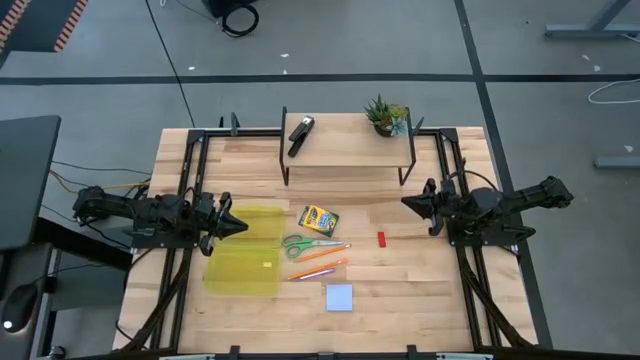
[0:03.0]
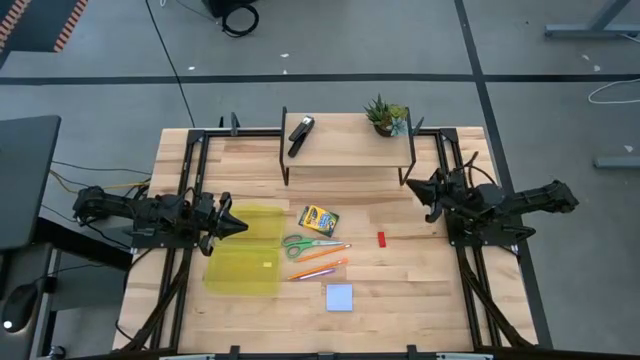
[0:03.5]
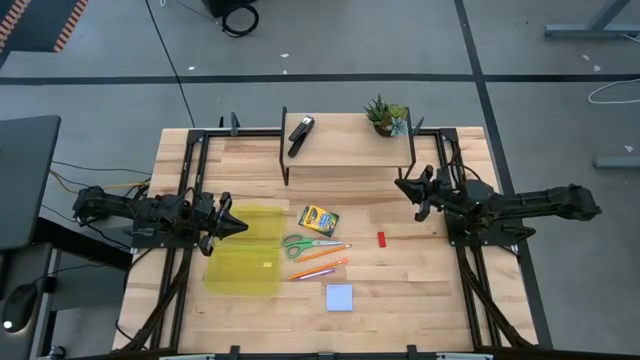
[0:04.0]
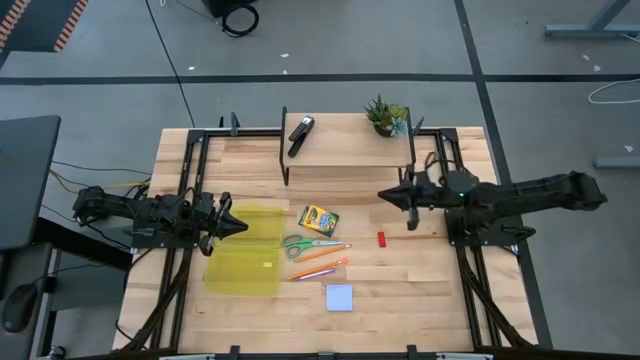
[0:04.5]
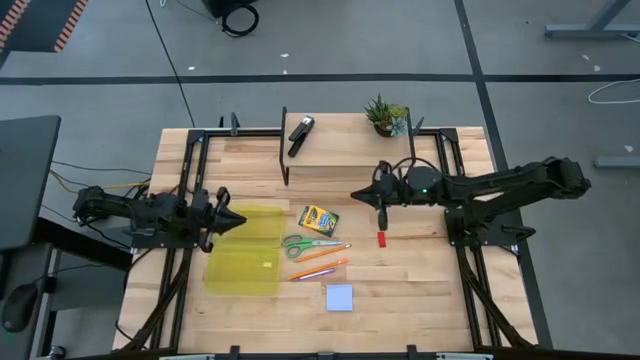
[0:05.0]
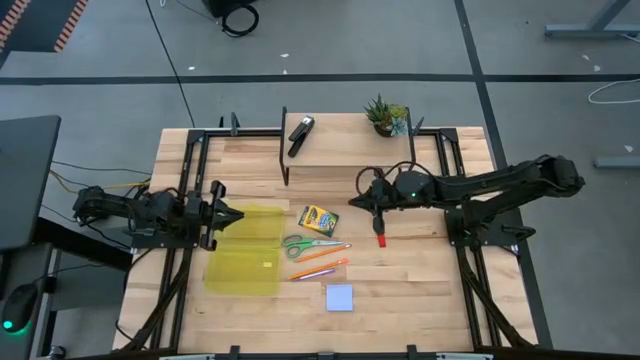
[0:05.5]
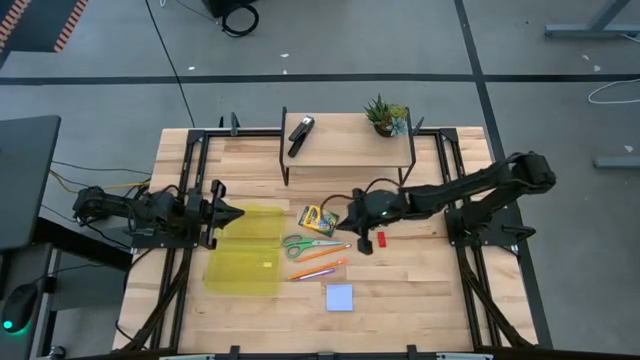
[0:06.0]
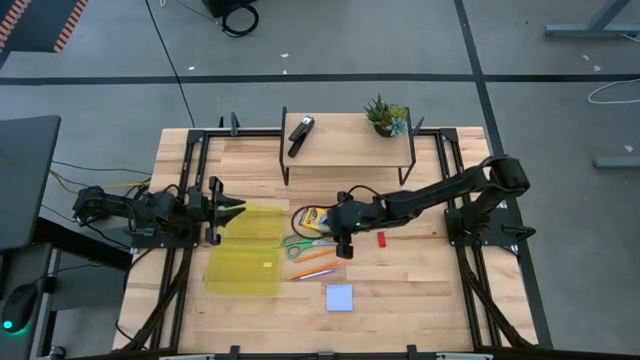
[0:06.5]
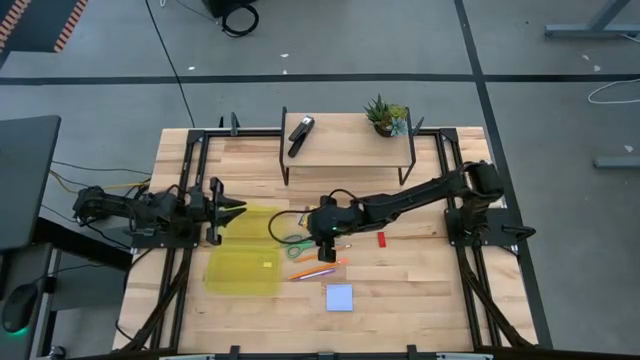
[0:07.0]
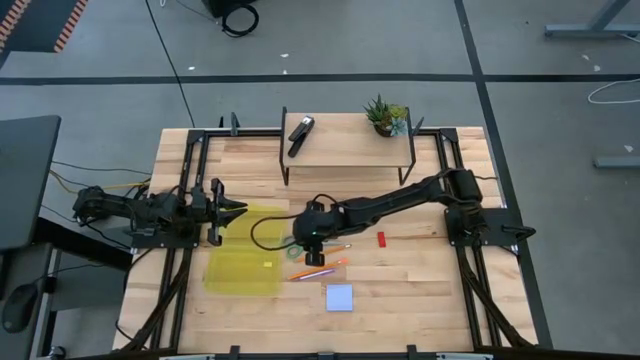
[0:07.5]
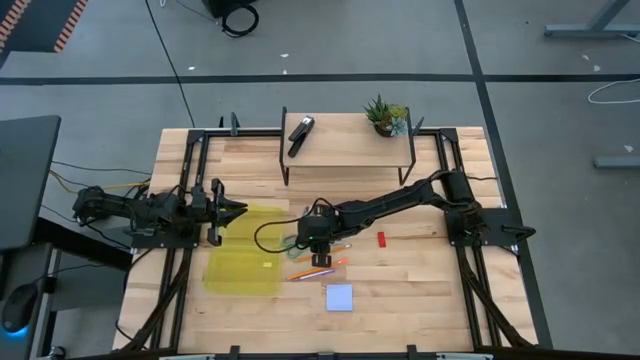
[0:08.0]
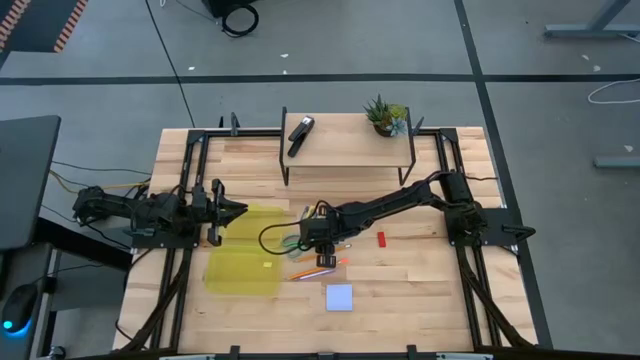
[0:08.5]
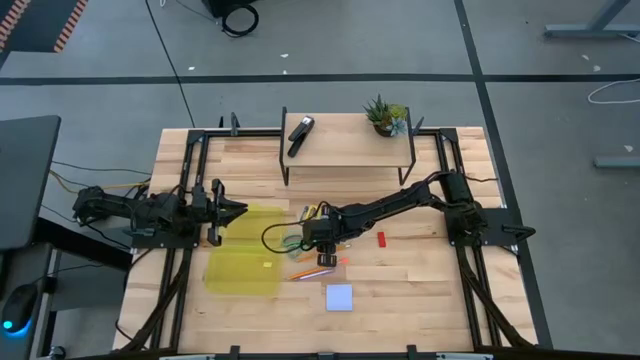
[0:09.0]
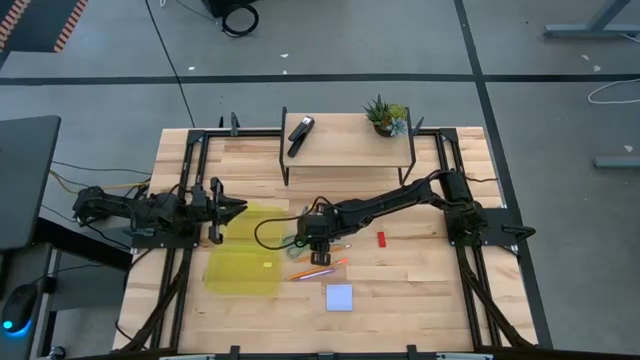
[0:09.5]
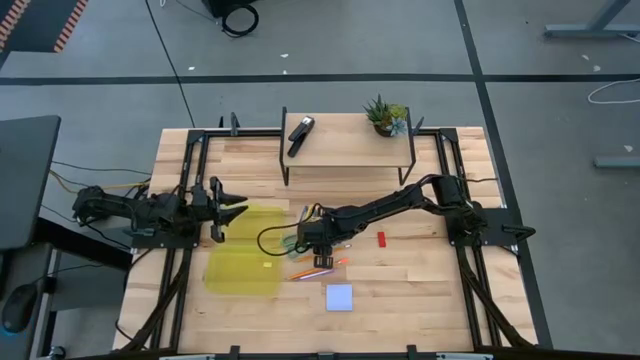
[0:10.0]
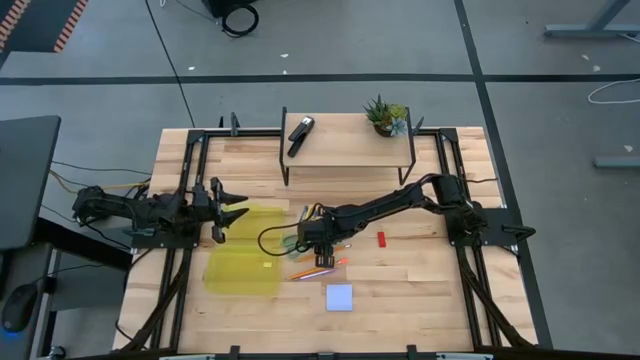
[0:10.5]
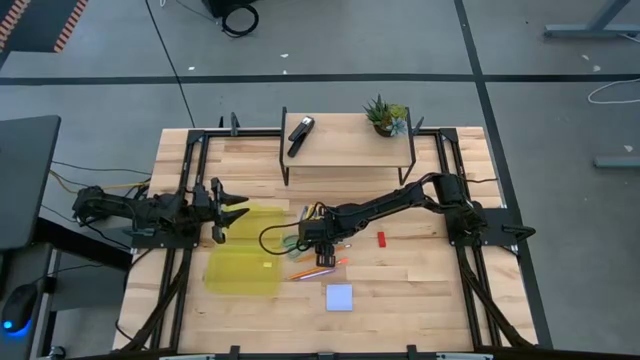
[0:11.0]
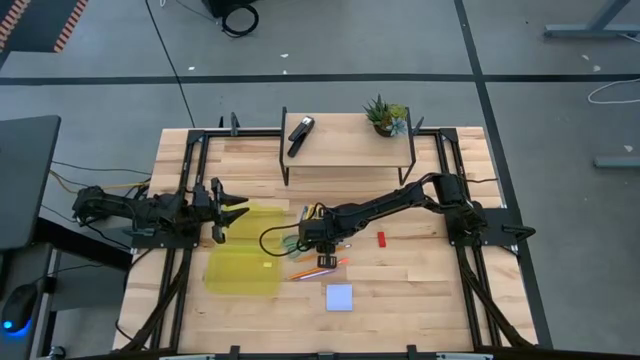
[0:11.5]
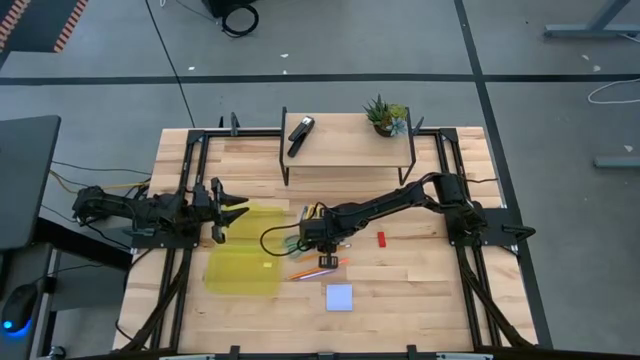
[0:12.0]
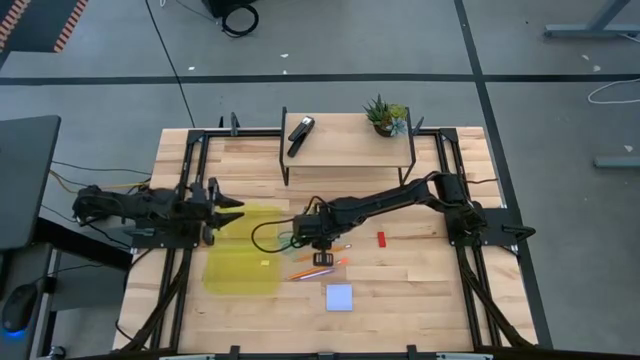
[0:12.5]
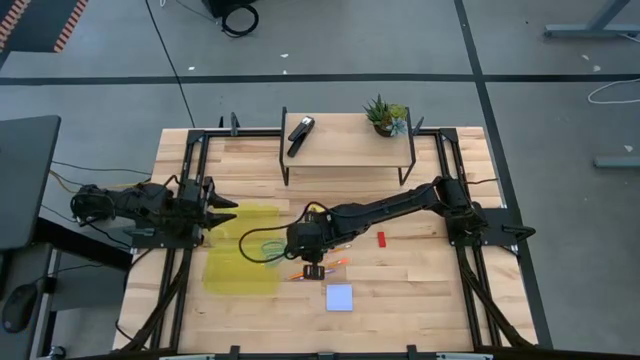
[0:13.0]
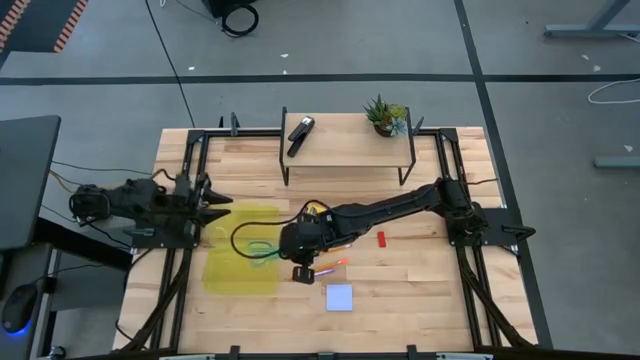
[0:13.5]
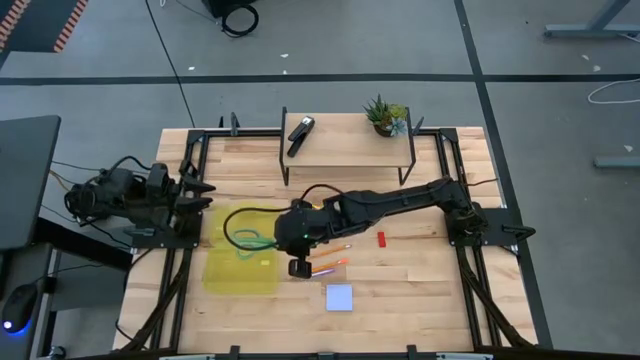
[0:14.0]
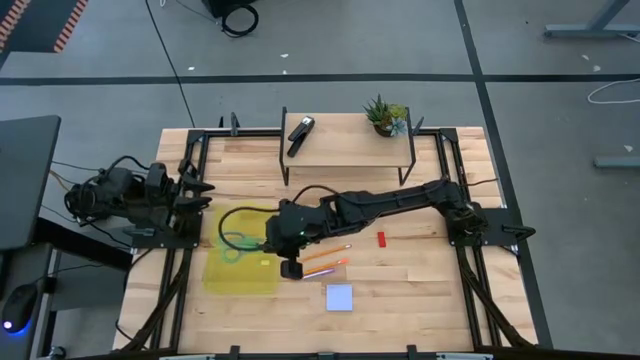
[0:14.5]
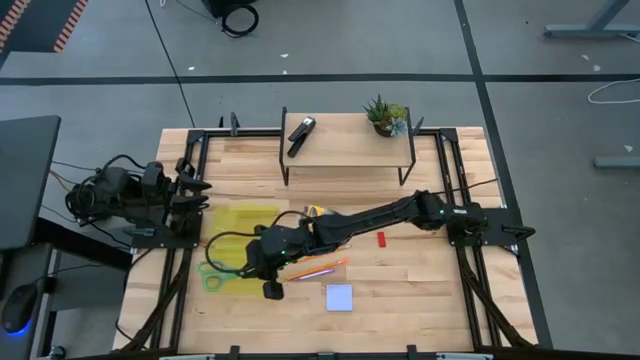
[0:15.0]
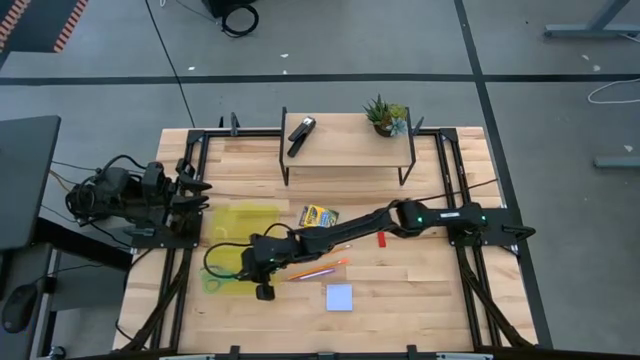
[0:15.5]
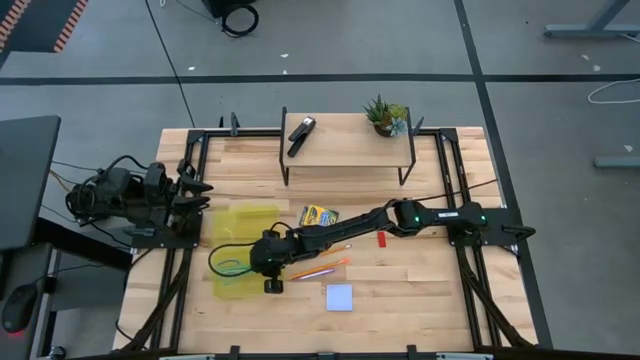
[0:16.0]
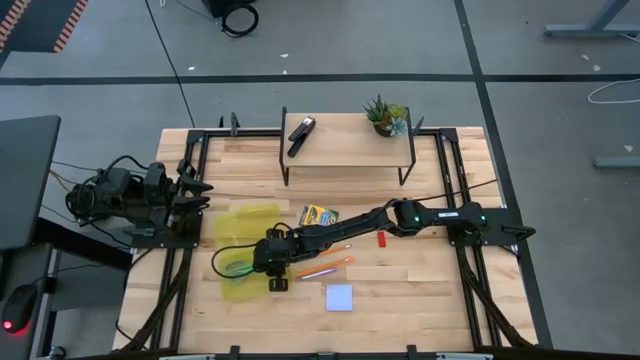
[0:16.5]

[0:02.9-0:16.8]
Task: Pack school essentials
Put the green scissors into the yellow supply box

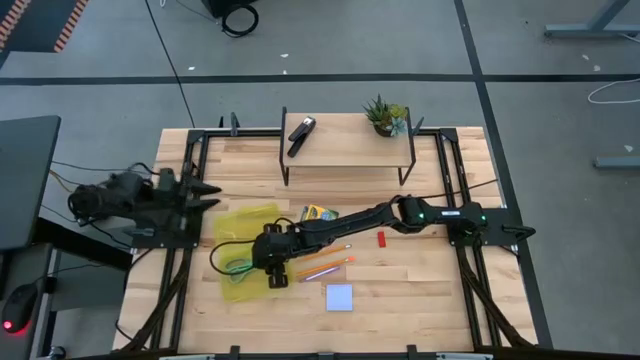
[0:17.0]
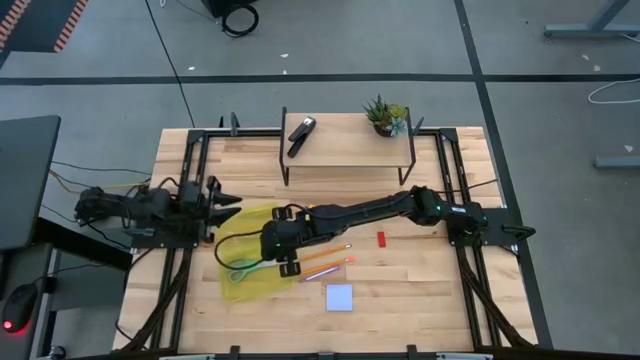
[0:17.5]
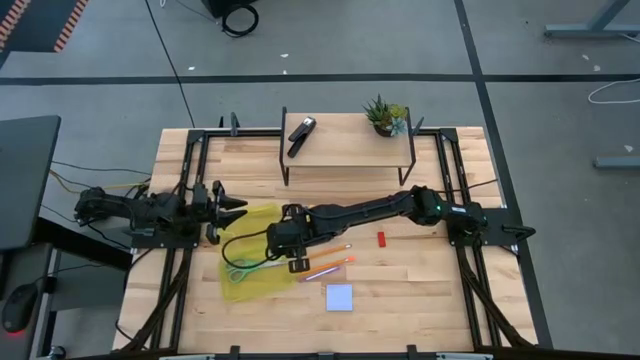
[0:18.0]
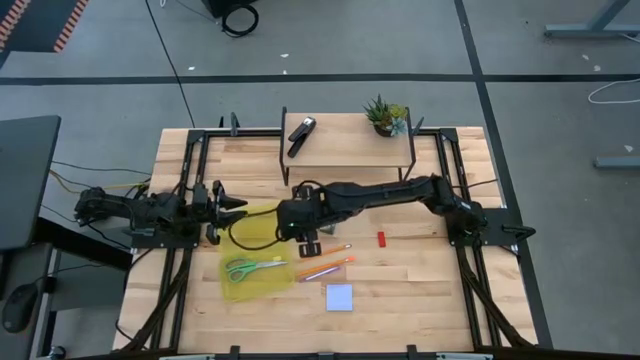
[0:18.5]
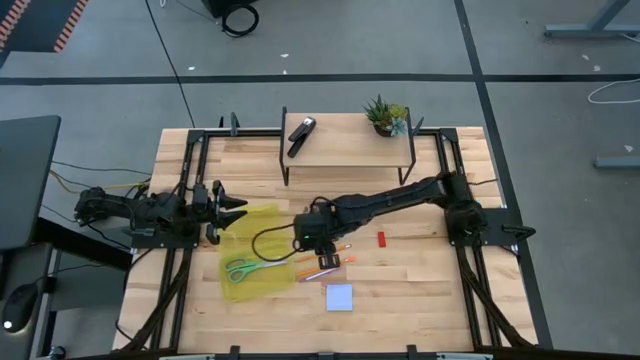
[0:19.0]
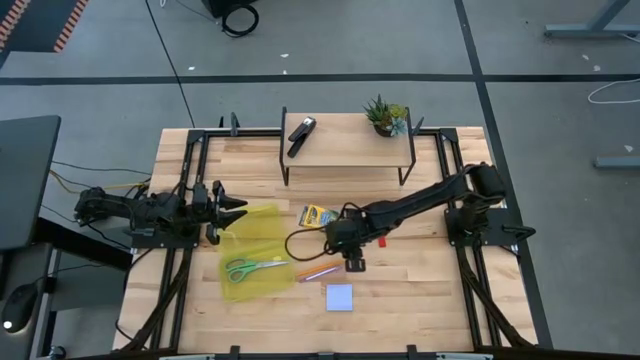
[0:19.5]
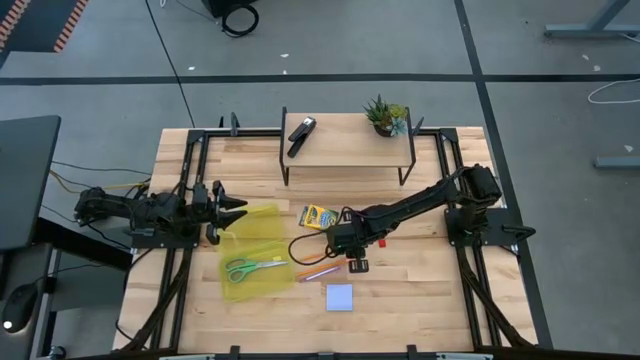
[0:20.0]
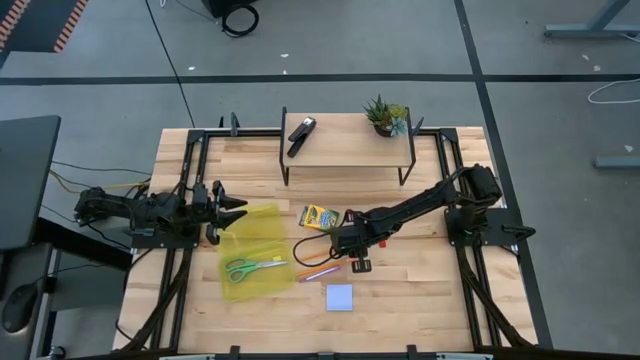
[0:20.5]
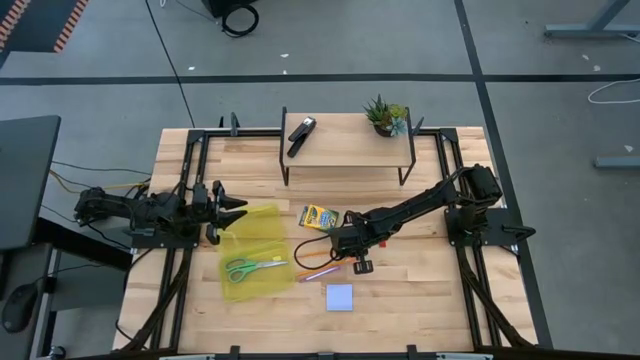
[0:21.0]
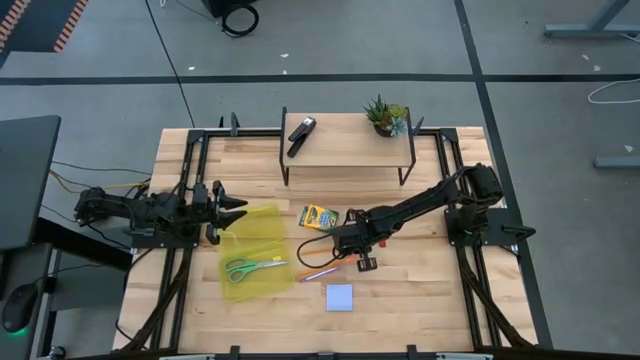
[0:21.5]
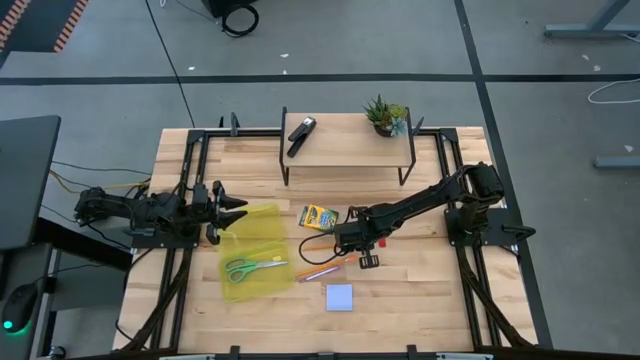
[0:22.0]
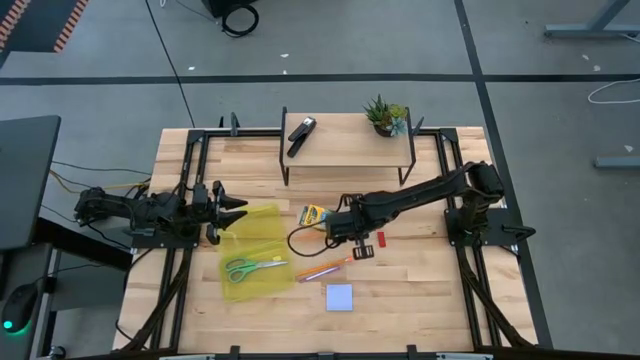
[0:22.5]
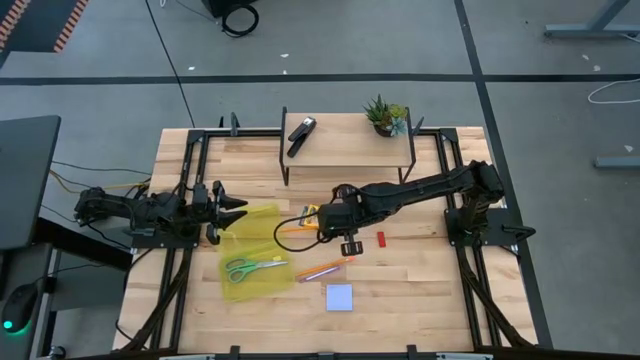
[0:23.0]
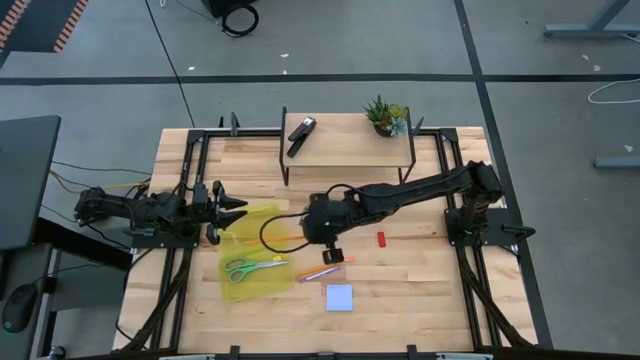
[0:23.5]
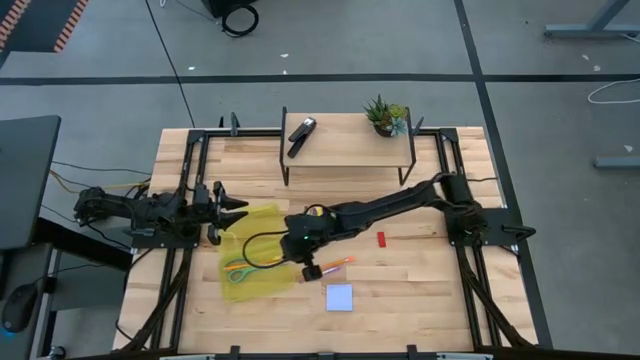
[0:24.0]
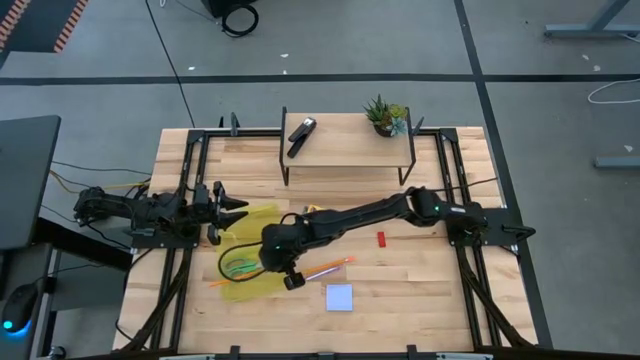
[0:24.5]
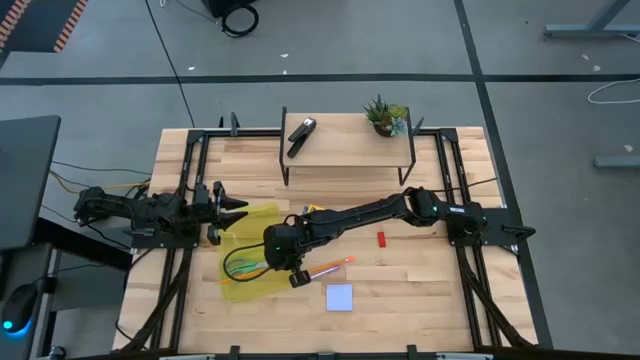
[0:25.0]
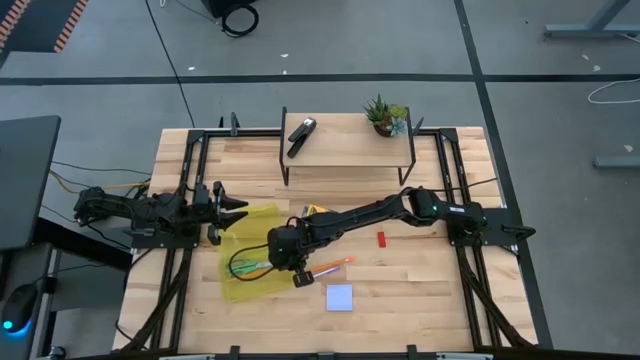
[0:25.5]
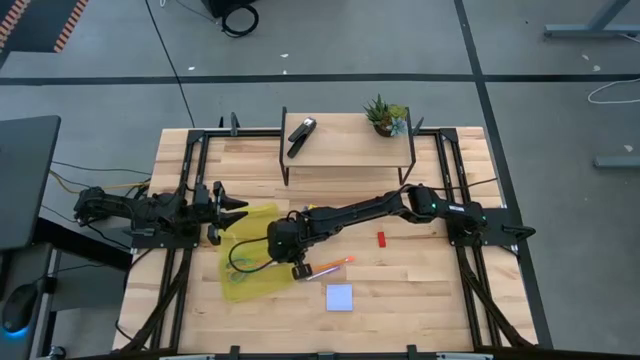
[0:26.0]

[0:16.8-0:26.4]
Put the top orange pencil into the yellow supply box
